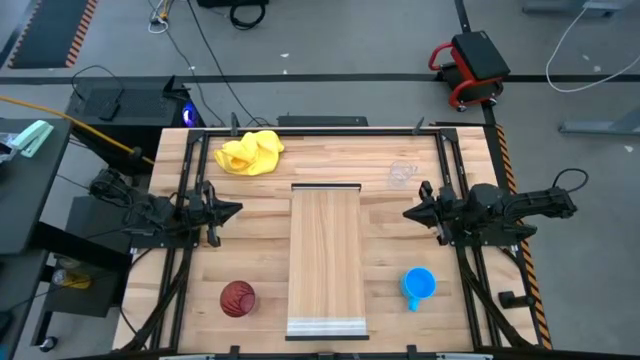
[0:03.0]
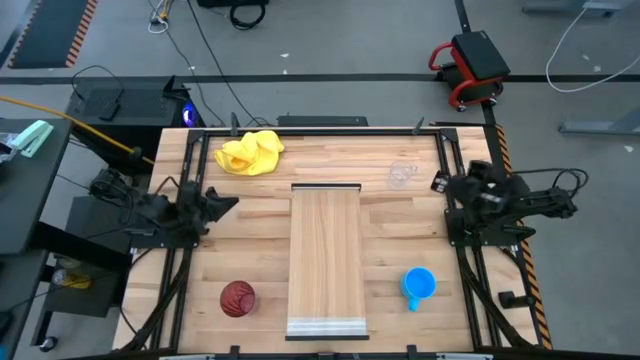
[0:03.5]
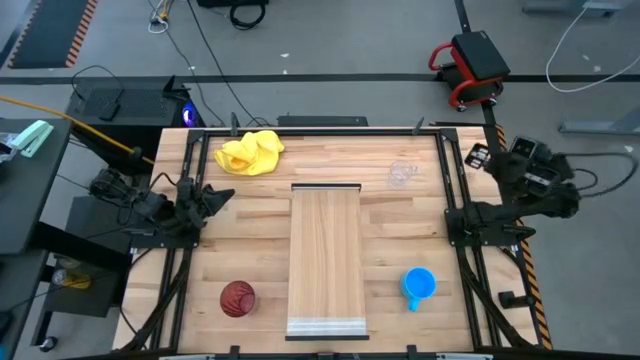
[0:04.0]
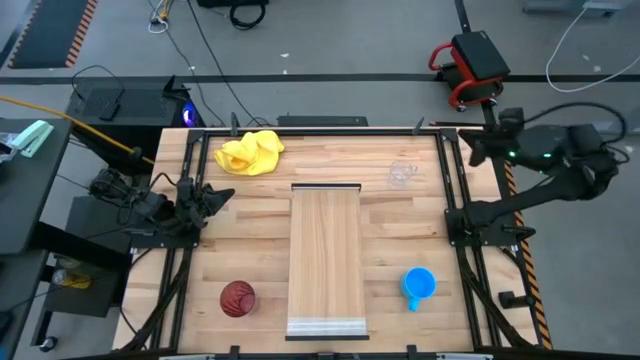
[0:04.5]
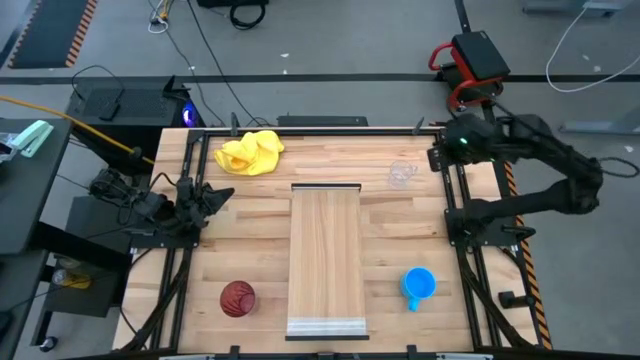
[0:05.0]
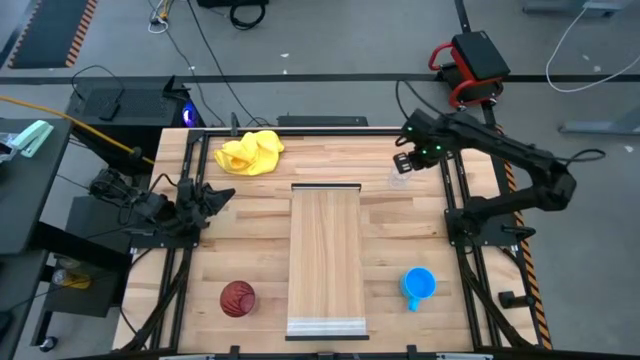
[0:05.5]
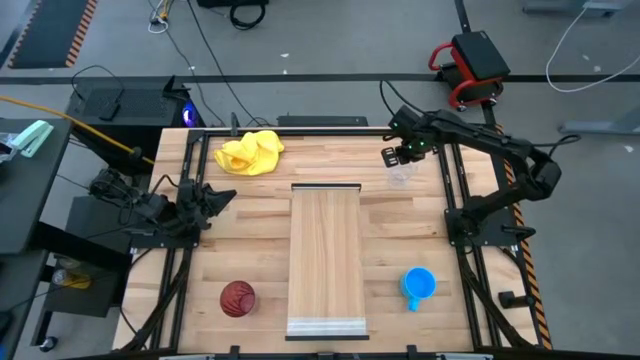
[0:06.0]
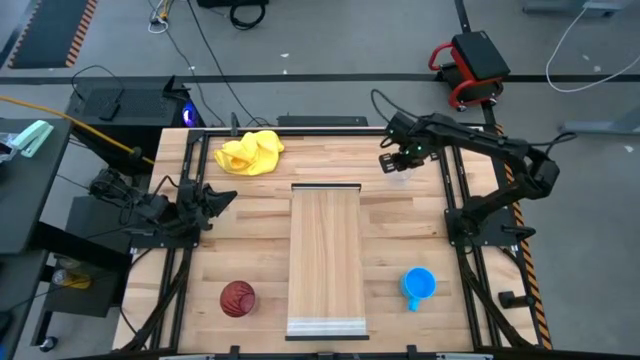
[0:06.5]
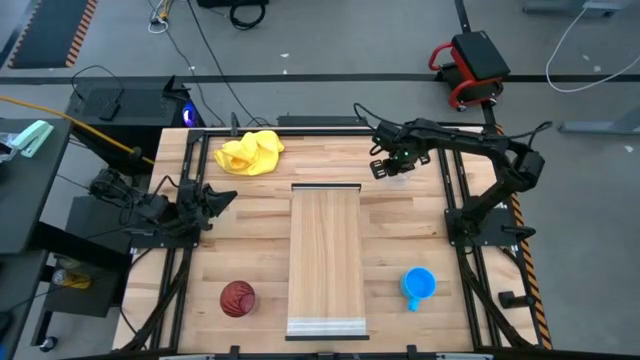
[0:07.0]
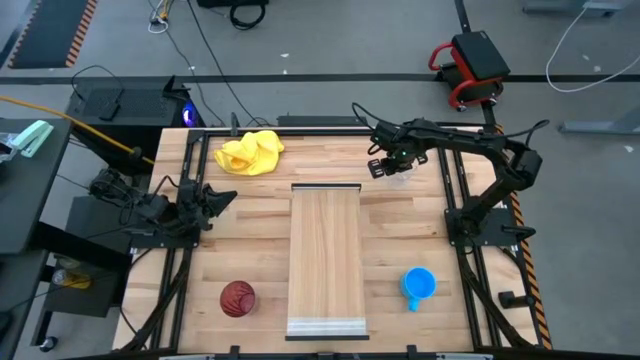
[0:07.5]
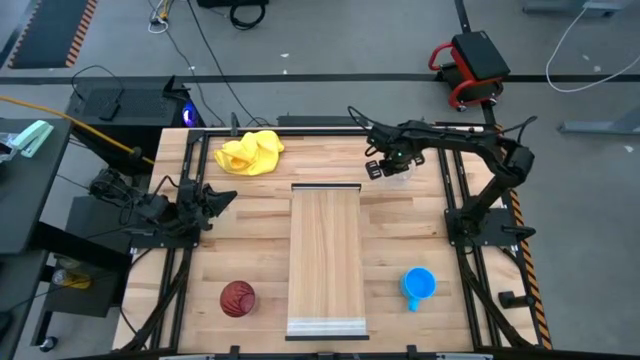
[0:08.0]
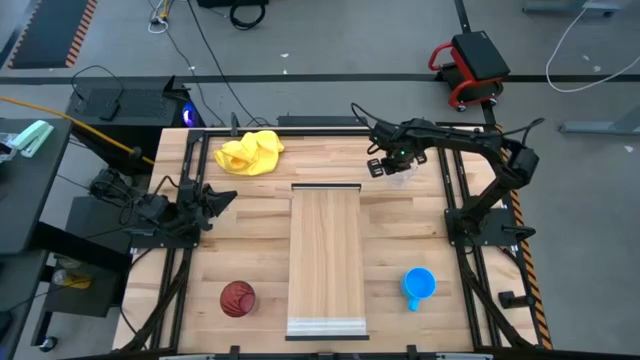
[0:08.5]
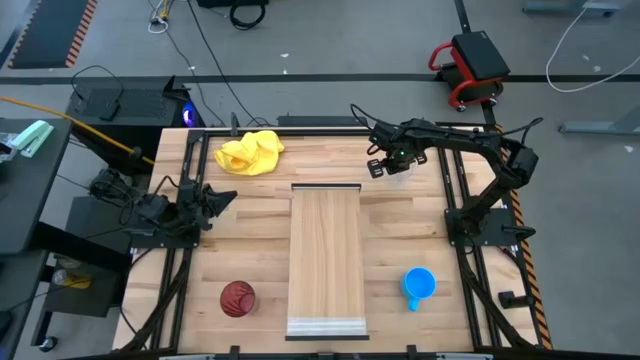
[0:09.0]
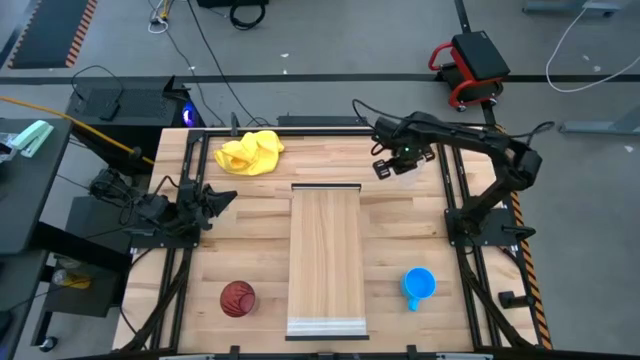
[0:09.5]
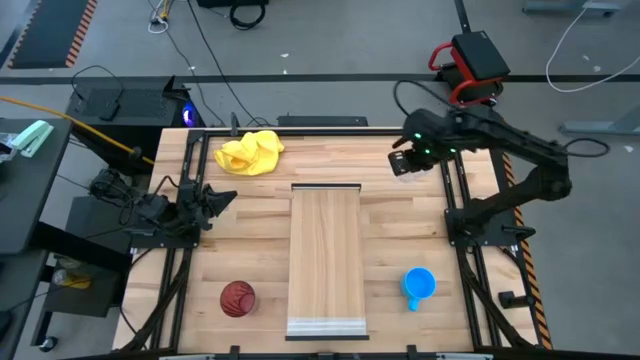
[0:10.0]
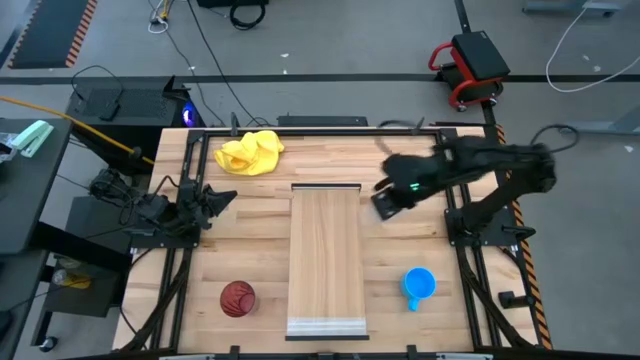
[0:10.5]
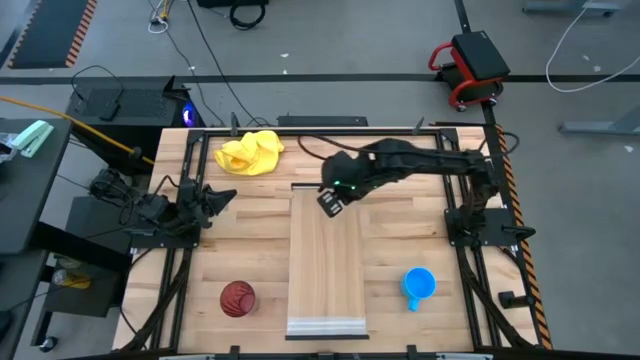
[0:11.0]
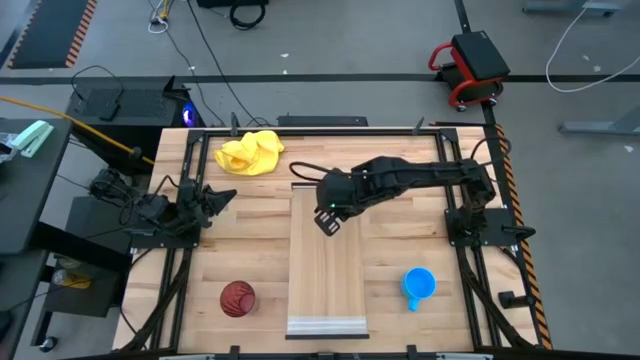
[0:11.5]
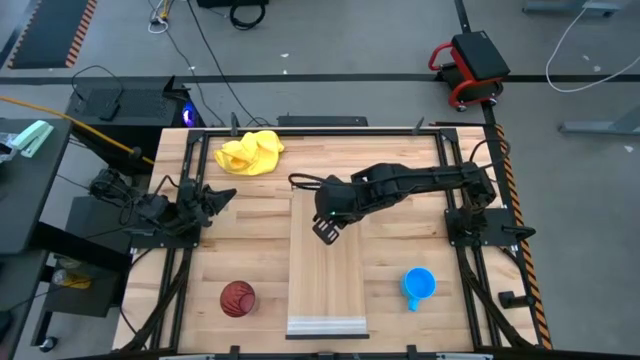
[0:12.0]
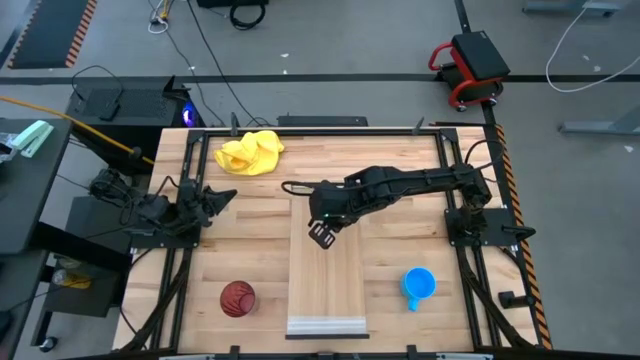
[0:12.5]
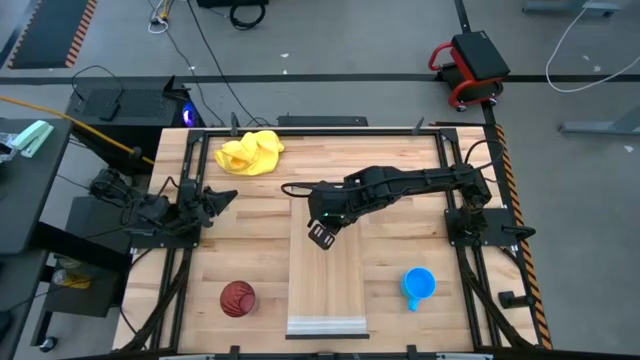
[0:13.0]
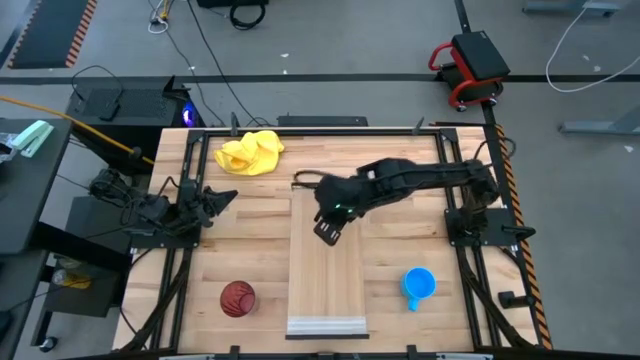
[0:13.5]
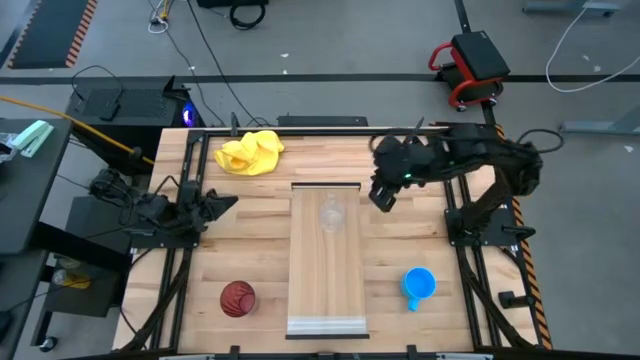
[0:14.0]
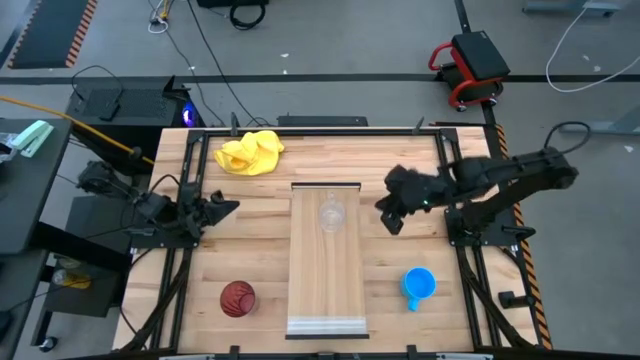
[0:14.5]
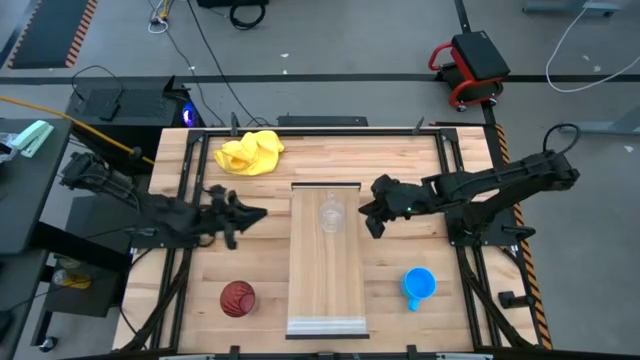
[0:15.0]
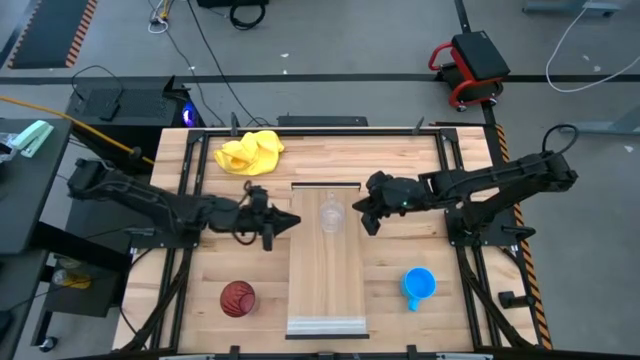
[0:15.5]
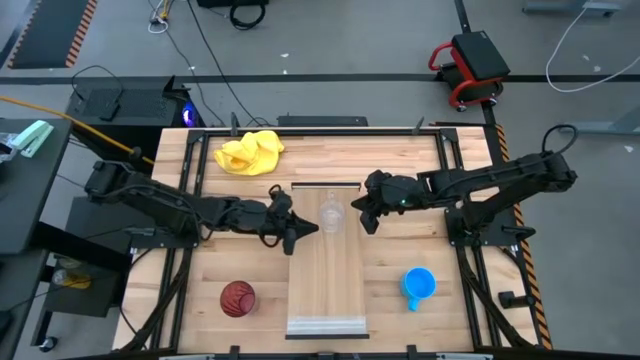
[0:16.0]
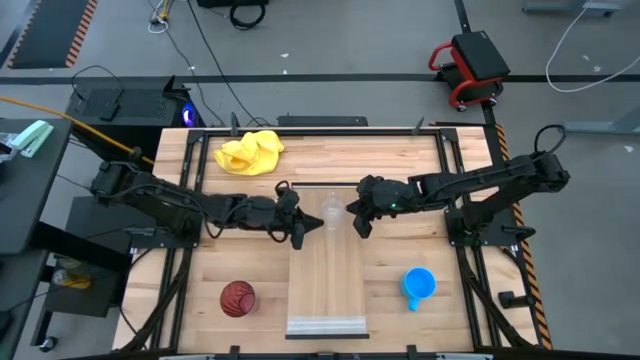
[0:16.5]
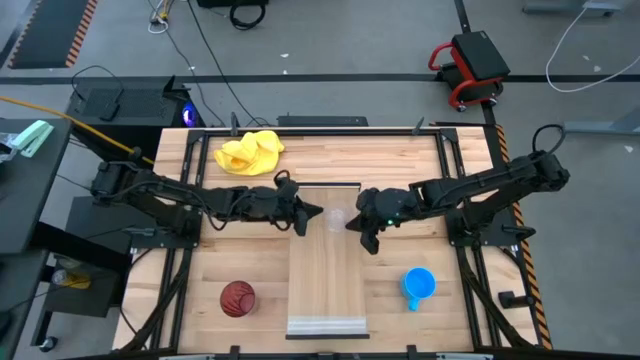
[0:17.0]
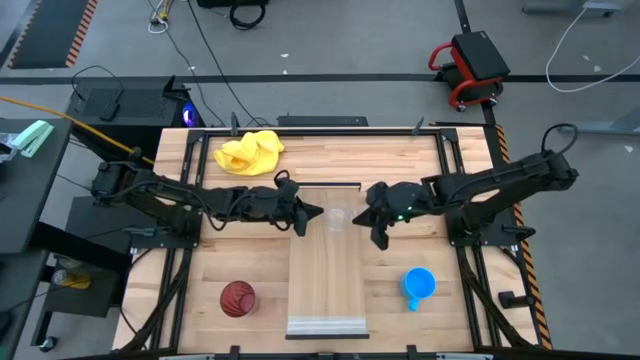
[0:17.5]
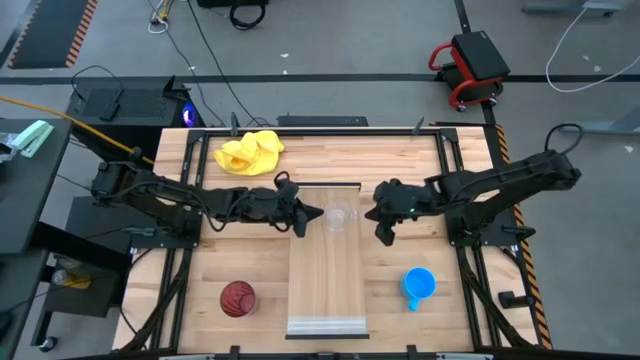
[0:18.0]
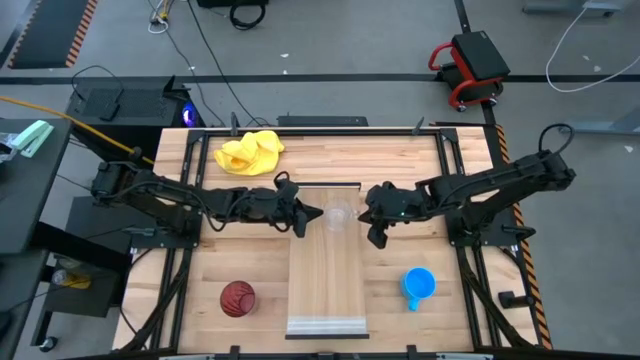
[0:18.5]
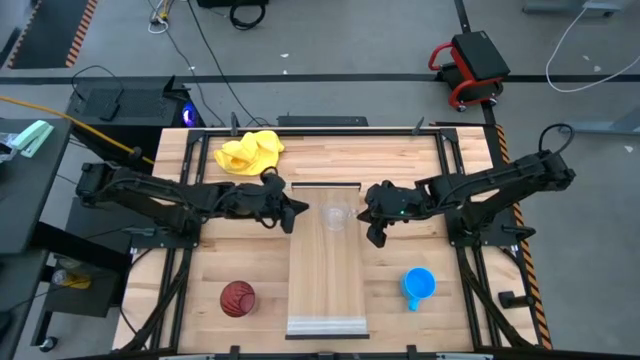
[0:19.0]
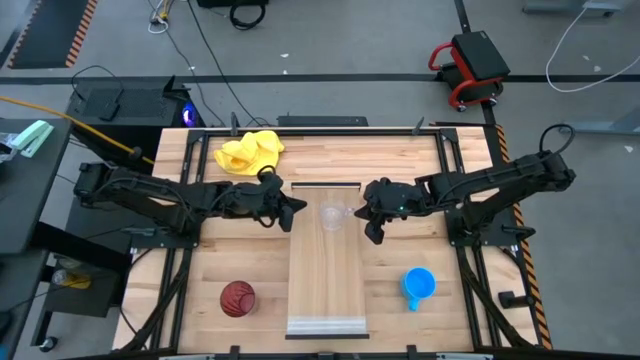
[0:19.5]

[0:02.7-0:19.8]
Task: Stack small to large cups/mugs on shelf
Put the transparent mug on the shelf

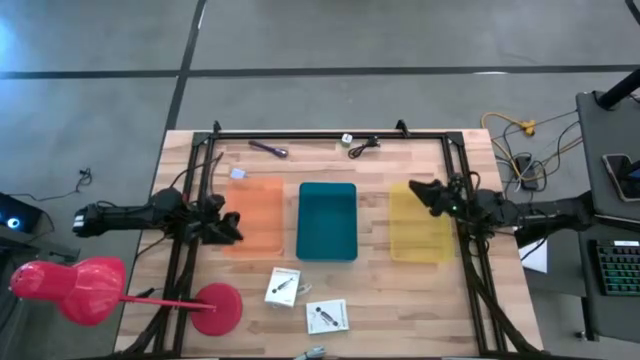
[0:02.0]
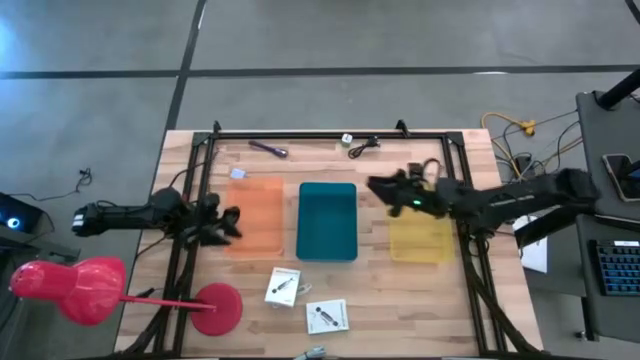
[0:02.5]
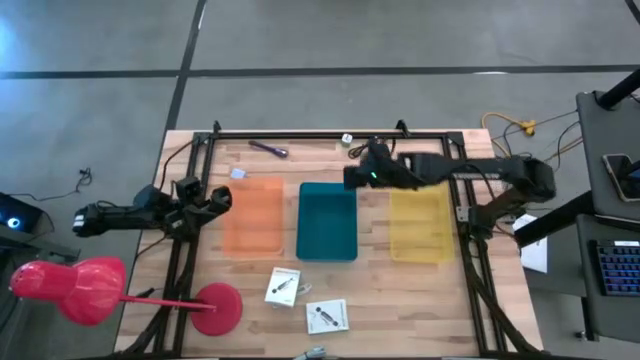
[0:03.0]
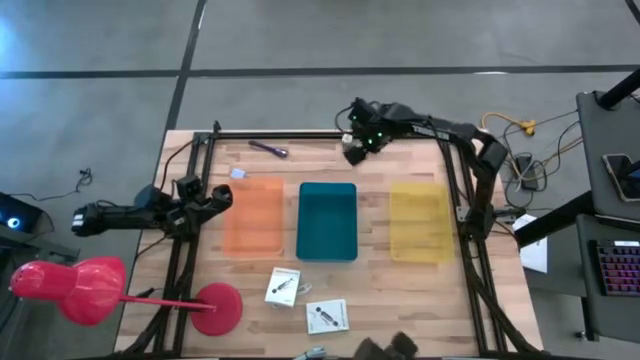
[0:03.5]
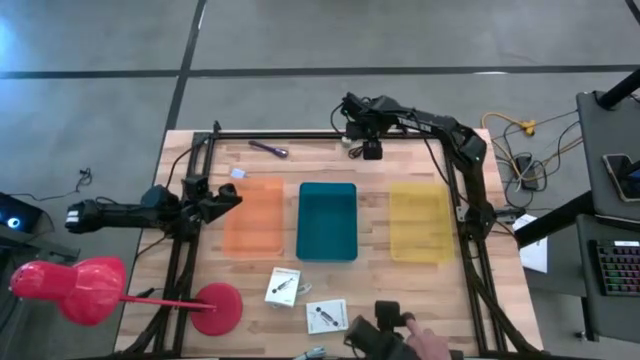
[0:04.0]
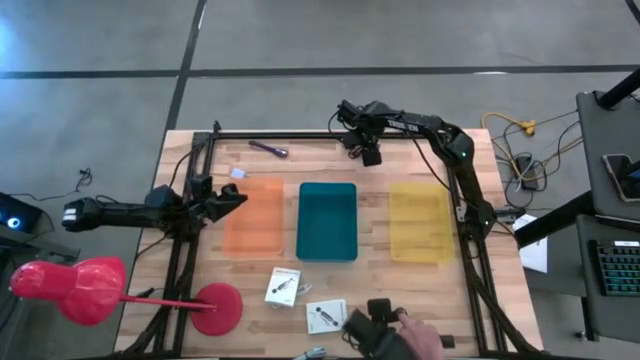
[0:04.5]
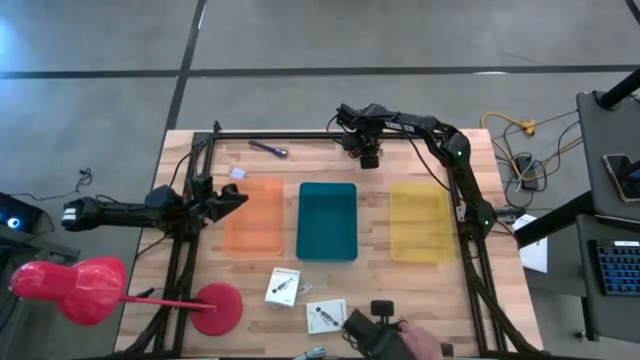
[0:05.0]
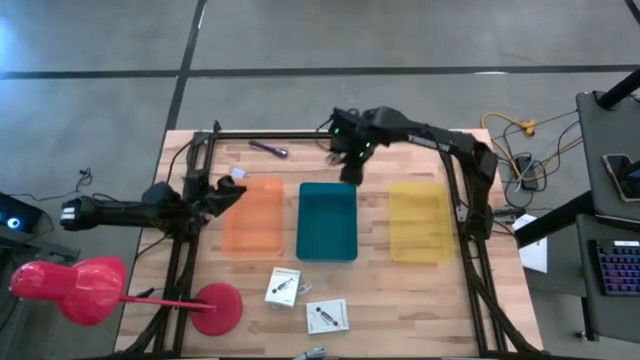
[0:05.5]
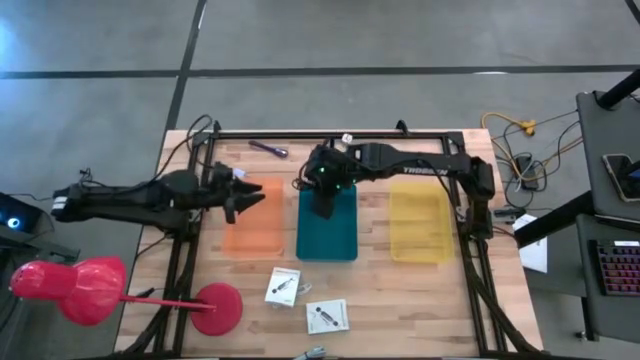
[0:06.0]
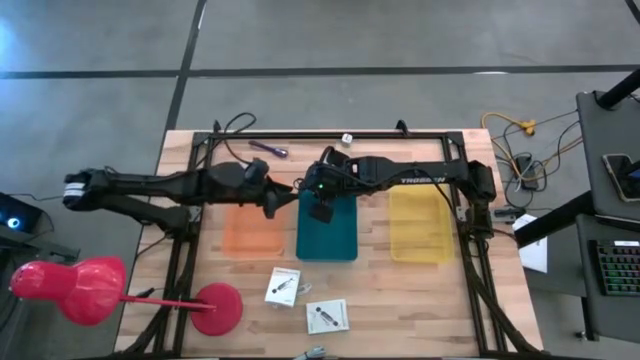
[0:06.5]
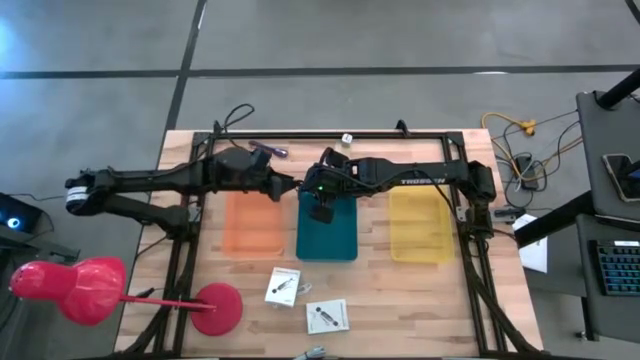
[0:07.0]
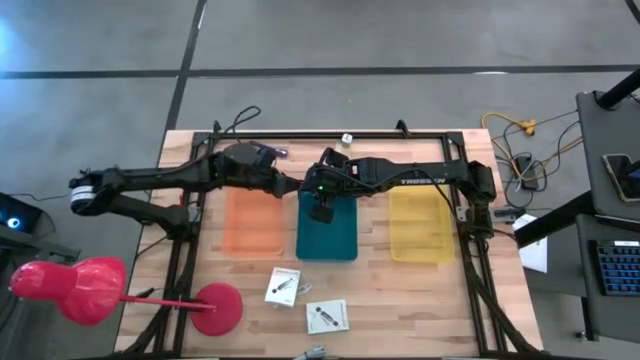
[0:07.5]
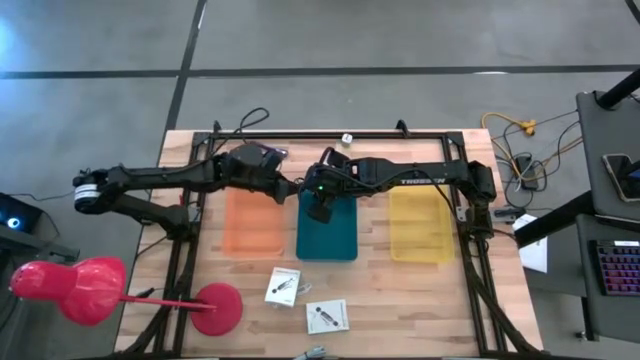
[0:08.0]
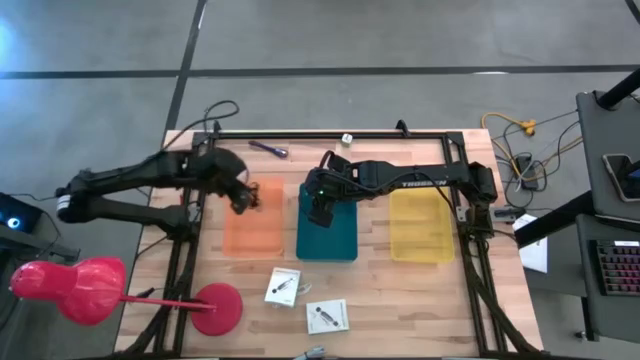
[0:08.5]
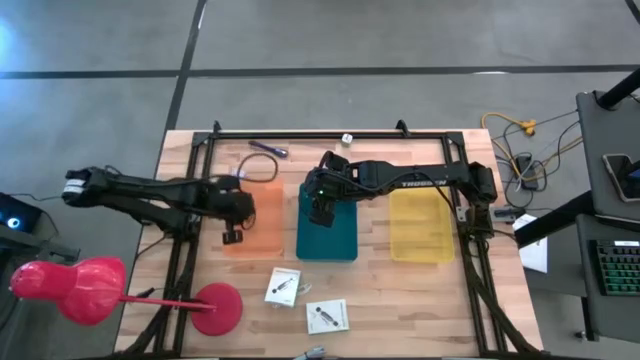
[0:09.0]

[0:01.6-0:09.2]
Task: Pick and place items into bin
Put the black USB cable wire into the orange bin
